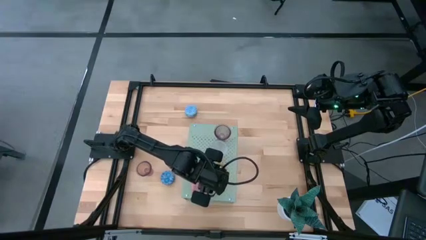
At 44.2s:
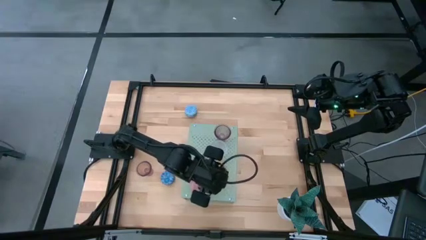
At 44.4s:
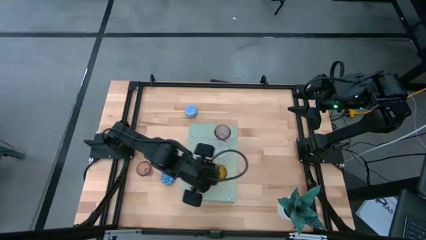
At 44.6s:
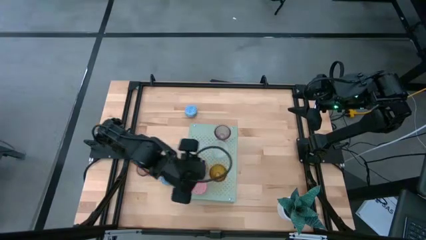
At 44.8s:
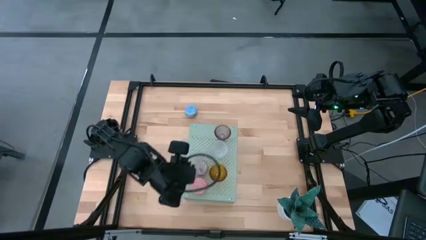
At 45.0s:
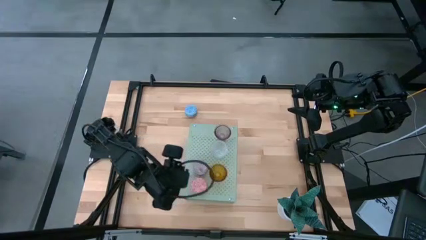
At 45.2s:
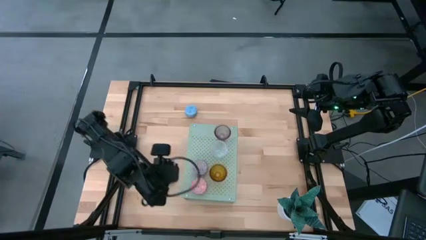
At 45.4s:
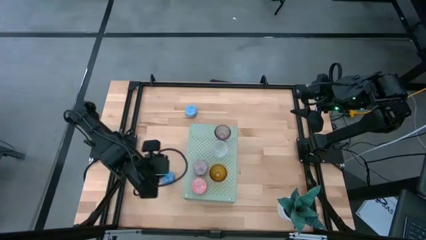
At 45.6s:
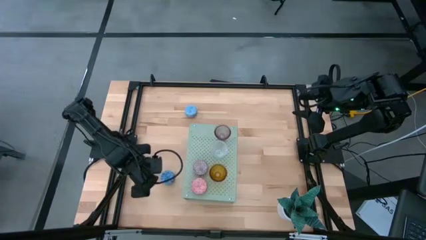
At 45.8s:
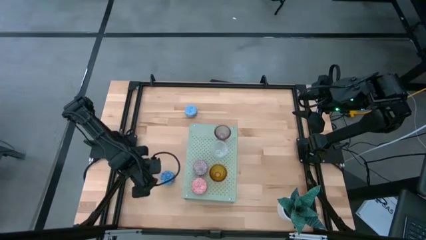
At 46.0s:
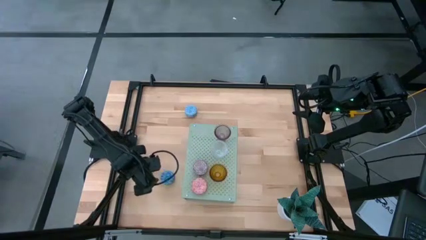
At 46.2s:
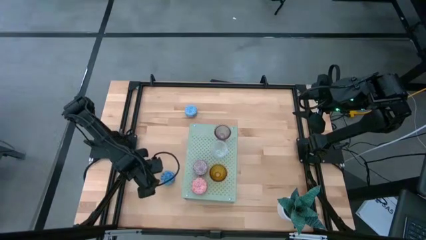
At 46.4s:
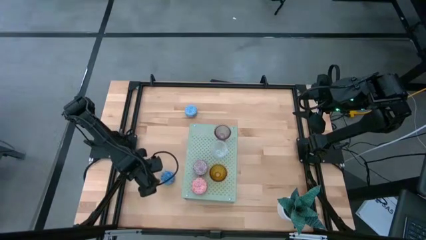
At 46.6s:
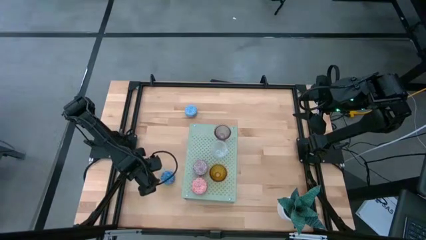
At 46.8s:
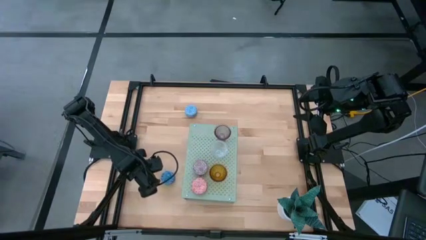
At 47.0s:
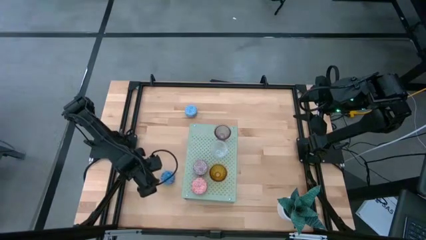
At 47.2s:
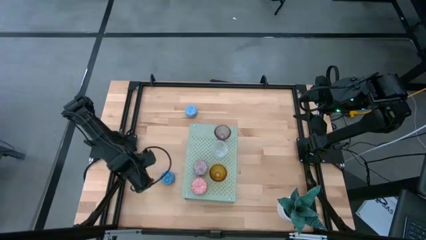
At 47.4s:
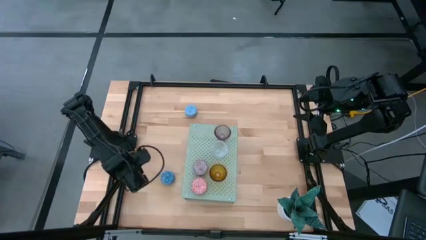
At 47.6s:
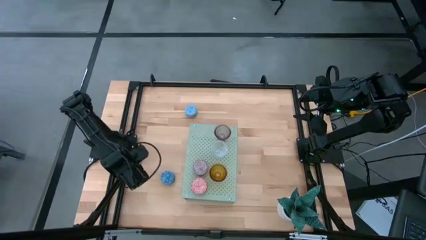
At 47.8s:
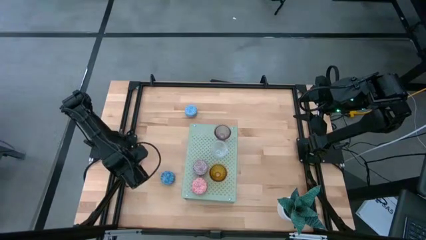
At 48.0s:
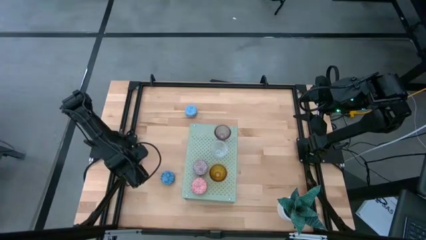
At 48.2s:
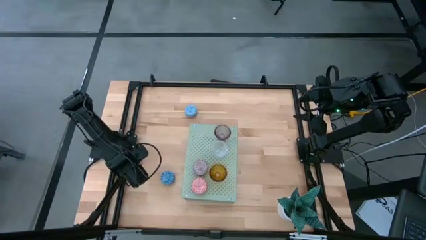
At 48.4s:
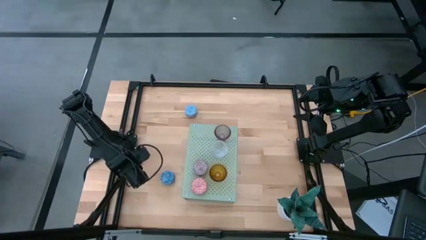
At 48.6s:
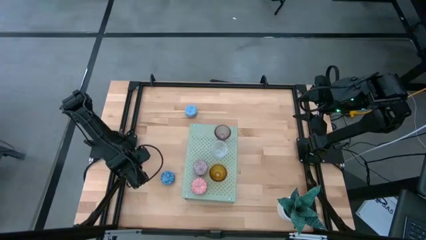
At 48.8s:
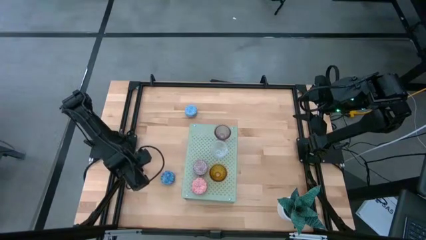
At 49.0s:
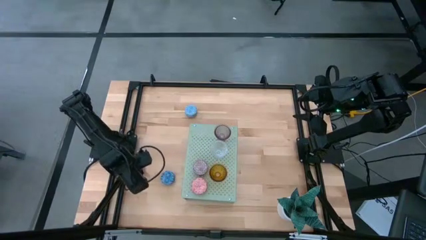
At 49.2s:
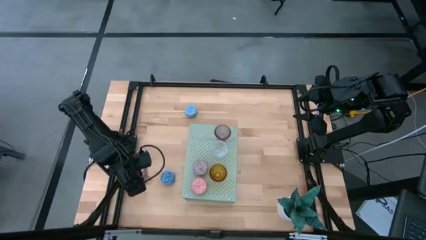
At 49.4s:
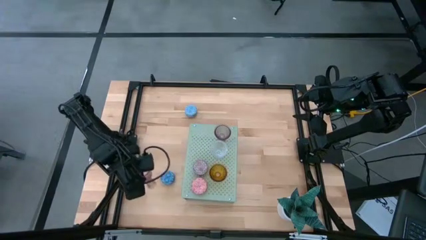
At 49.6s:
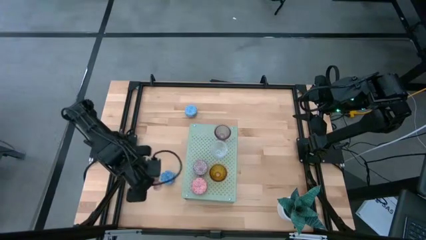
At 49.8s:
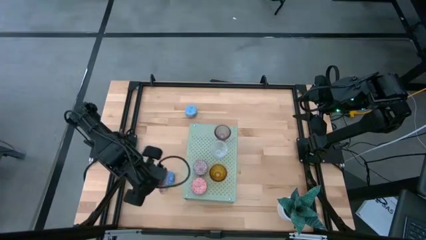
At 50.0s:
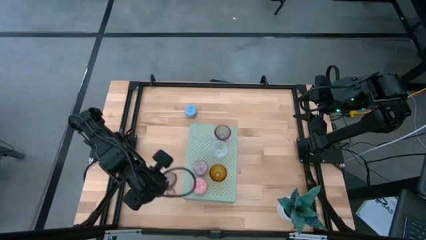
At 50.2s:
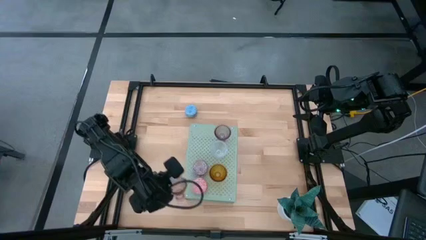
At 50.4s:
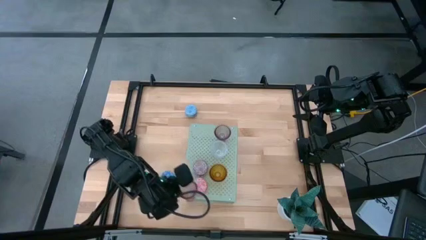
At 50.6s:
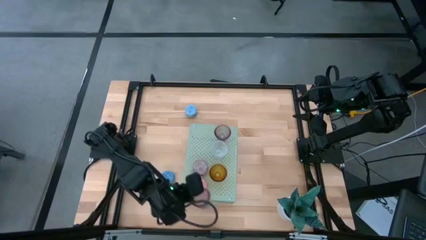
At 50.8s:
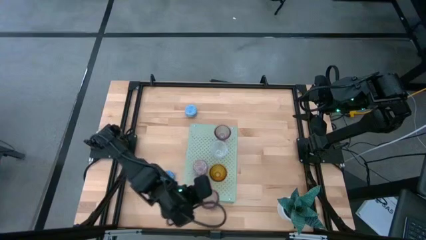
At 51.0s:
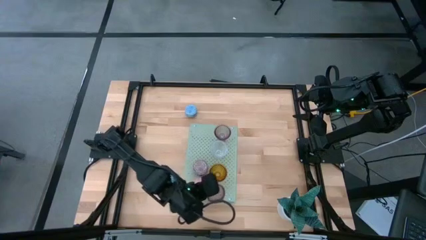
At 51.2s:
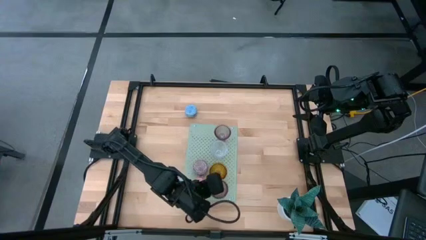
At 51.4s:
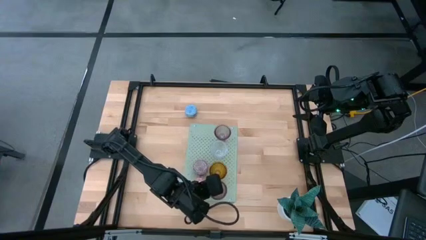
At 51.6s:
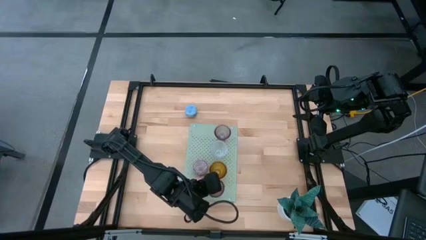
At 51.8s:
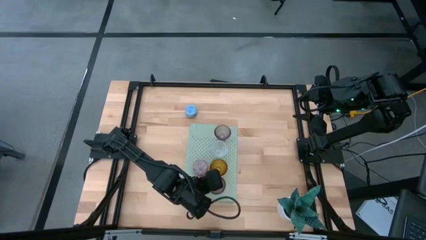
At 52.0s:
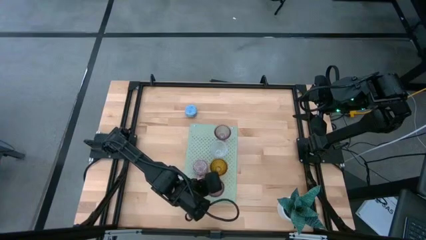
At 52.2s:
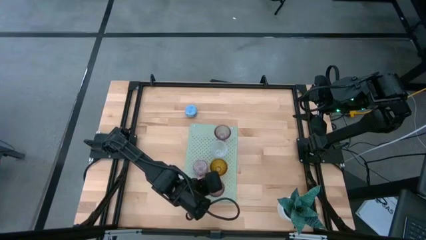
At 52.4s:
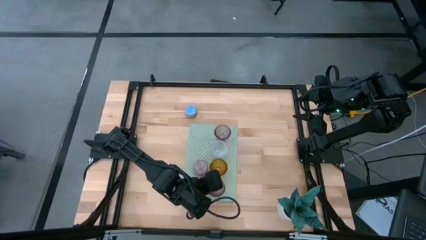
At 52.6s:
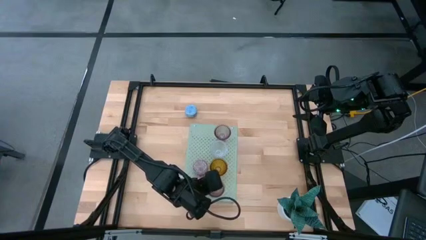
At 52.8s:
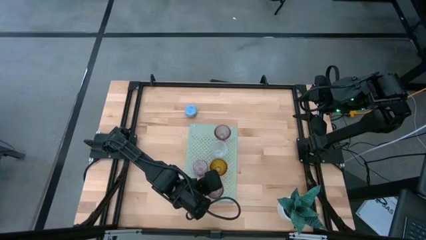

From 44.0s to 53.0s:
Task: Pick & Place candle stick holders
Put the pink candle holder on the shelf

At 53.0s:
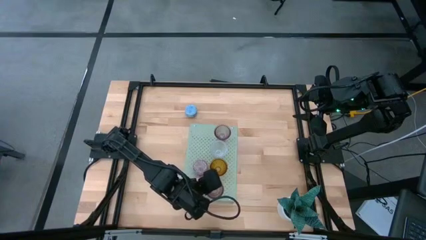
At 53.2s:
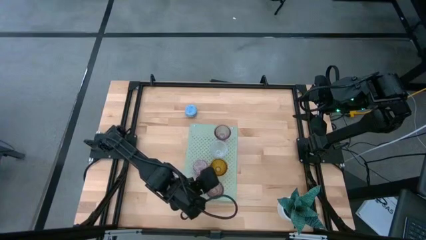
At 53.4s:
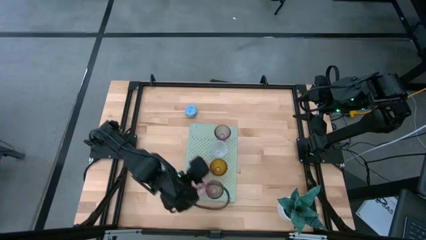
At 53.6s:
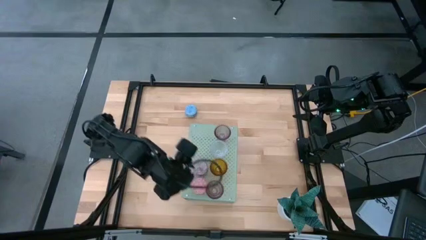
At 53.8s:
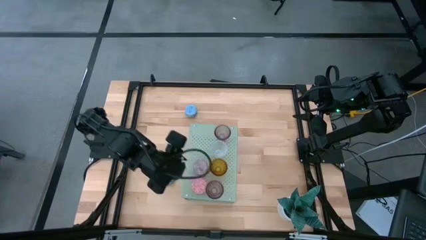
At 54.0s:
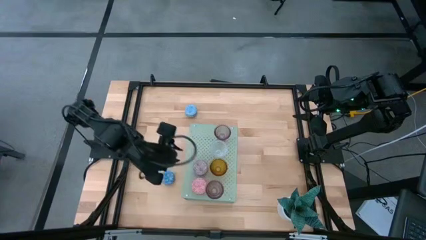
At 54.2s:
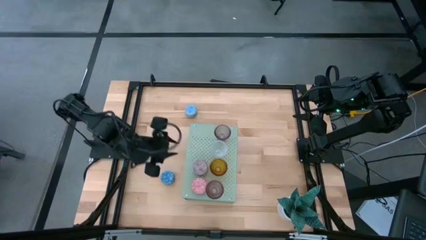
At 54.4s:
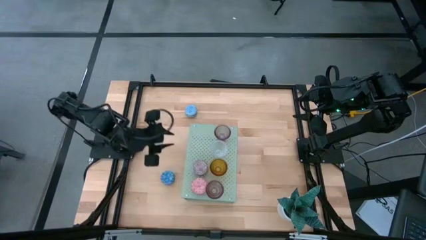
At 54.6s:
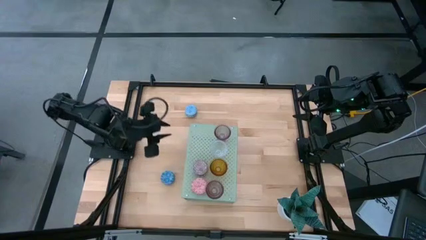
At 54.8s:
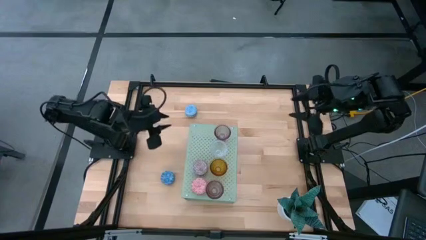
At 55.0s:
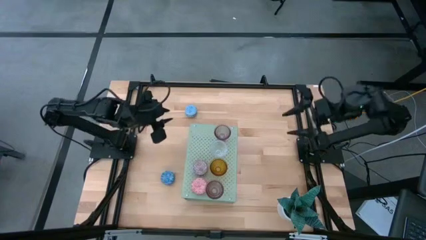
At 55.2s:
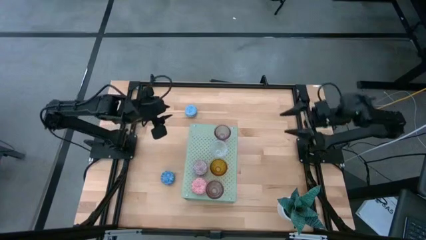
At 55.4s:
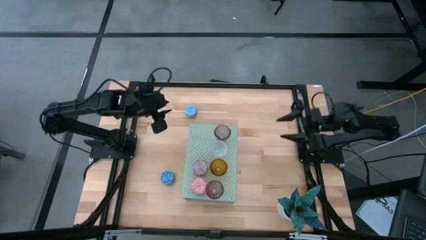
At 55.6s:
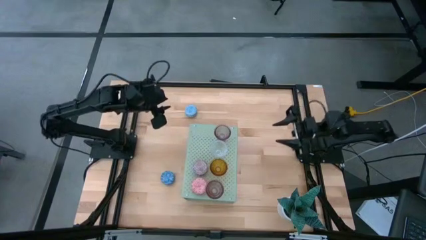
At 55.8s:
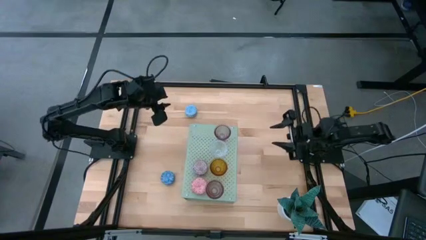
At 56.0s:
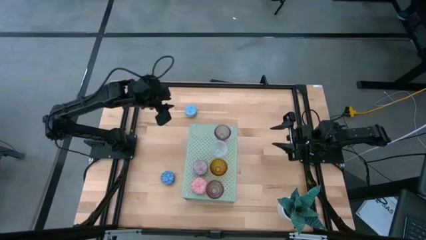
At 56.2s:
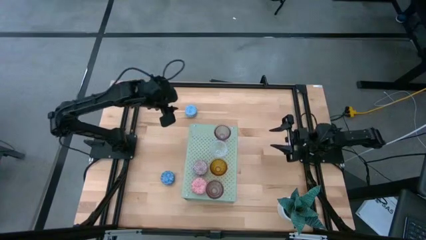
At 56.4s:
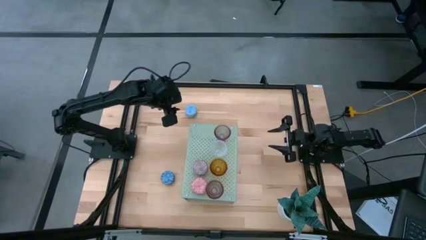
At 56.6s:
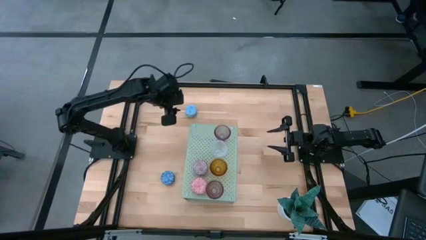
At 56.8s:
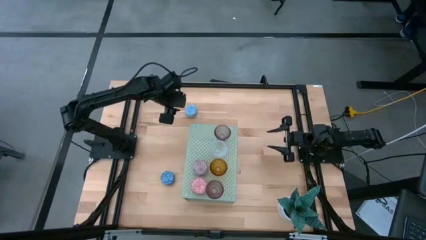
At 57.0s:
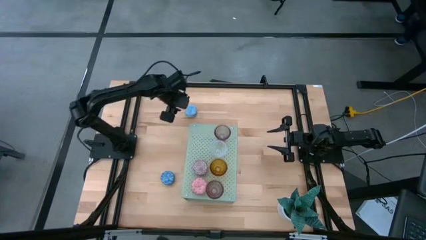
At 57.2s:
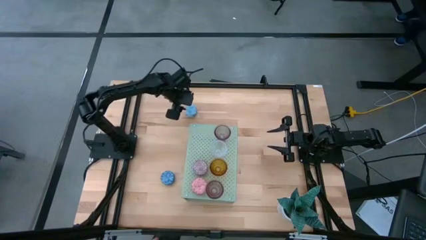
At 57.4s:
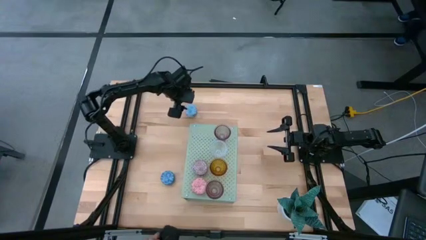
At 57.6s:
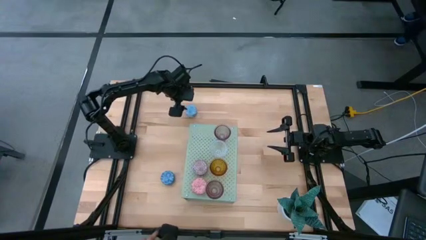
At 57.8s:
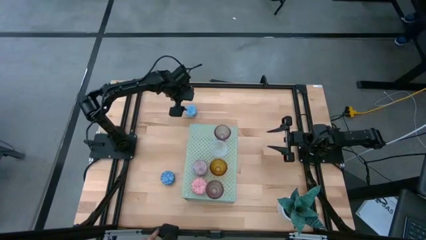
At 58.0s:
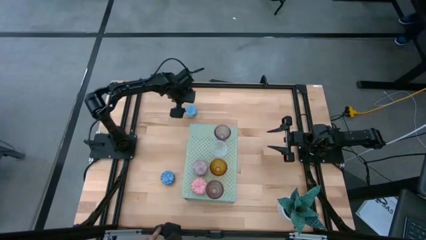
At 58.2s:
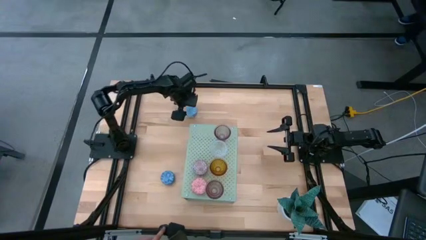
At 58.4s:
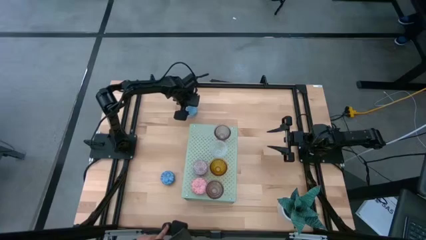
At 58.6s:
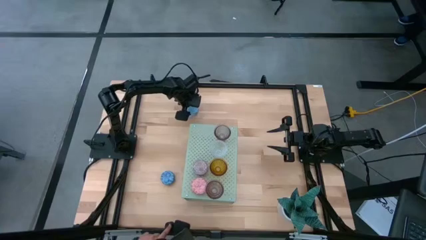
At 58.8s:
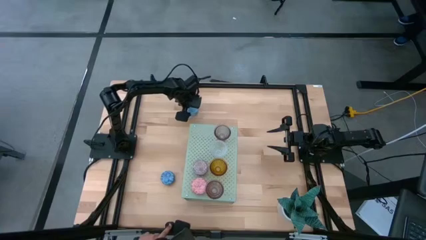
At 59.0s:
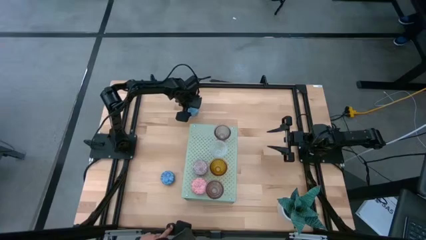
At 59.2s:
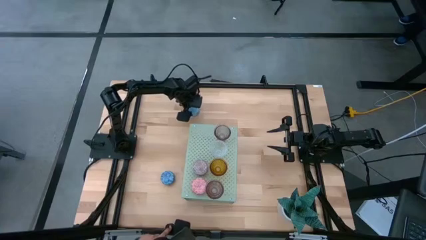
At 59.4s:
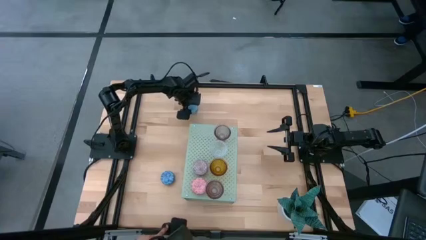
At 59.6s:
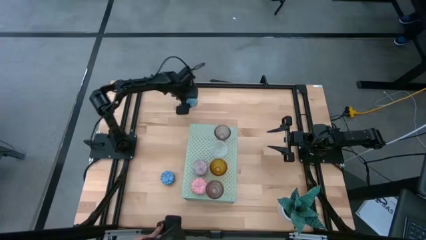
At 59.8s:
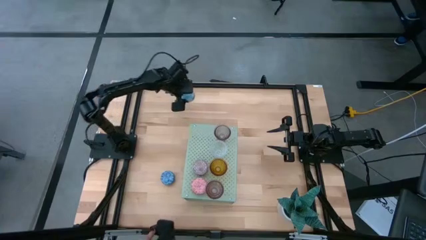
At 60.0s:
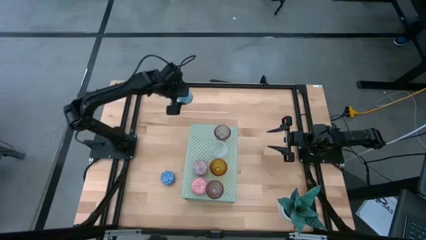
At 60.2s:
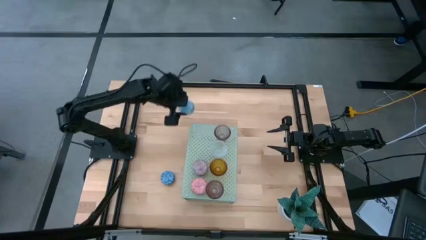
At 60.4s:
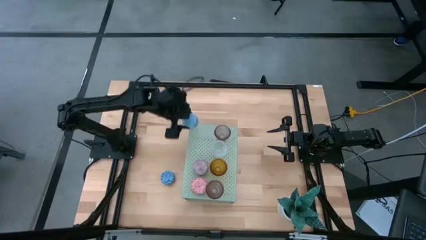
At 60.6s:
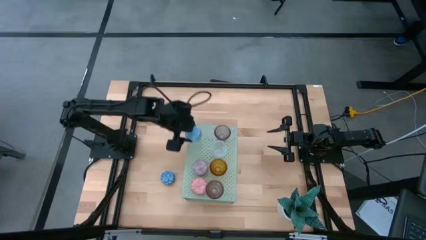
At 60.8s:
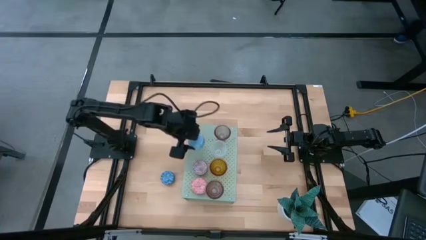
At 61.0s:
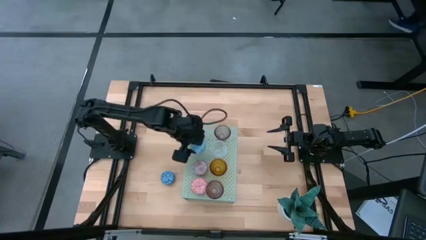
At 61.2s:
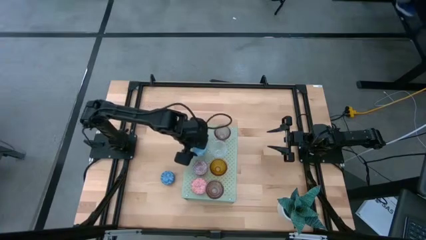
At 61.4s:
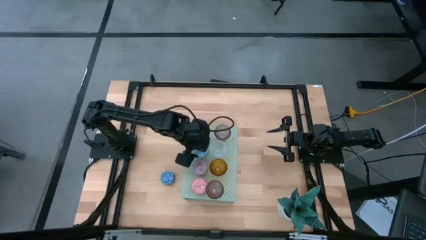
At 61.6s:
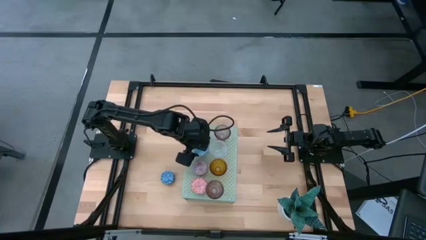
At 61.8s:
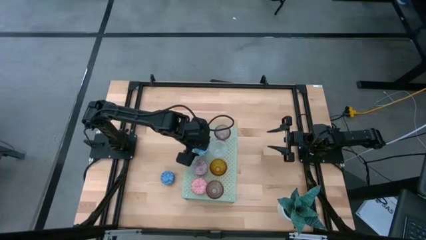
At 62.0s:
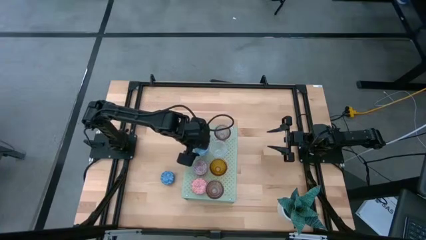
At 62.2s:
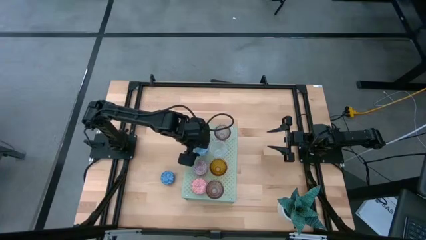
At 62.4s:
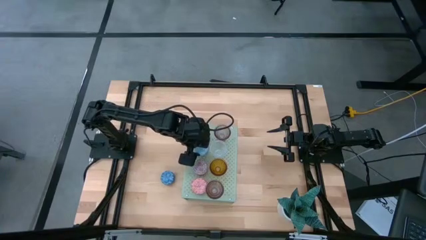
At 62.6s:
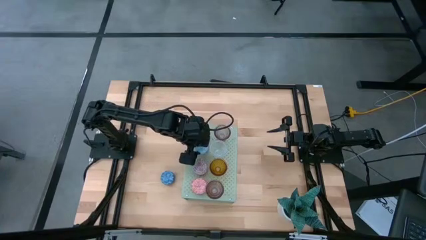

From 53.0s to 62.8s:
Put the top blue patterned scented candle on the shelf
